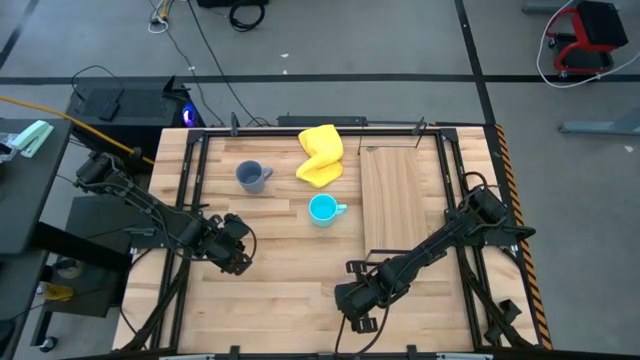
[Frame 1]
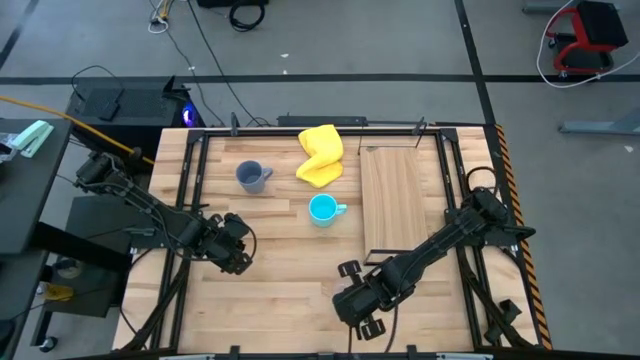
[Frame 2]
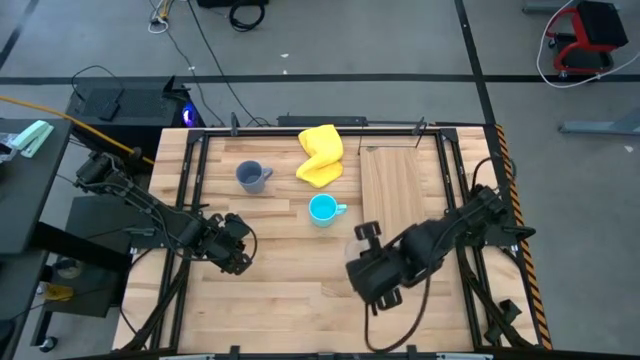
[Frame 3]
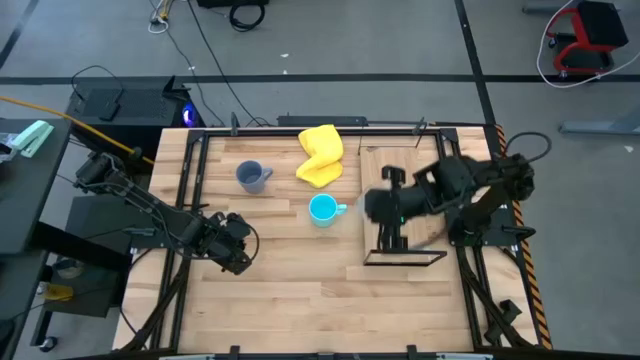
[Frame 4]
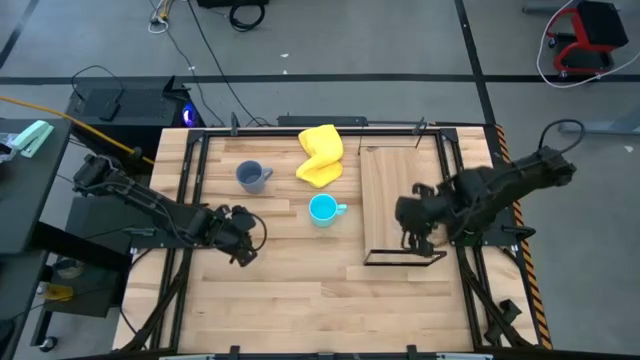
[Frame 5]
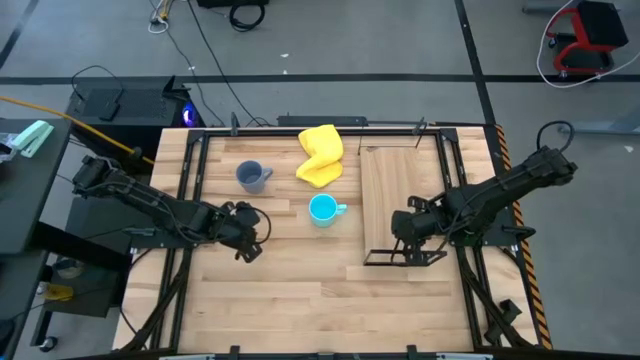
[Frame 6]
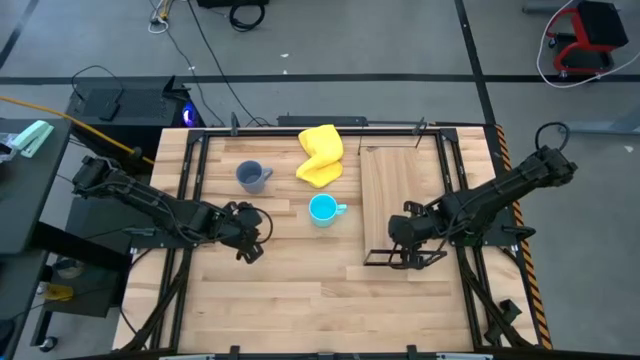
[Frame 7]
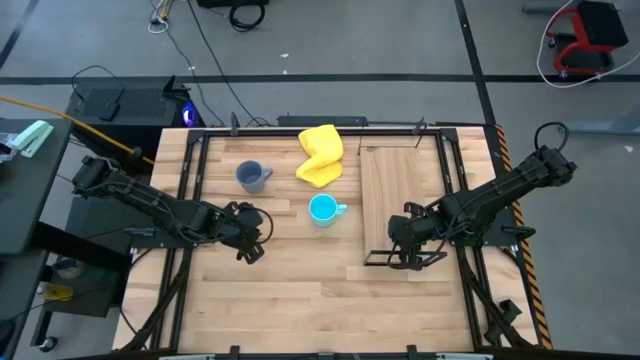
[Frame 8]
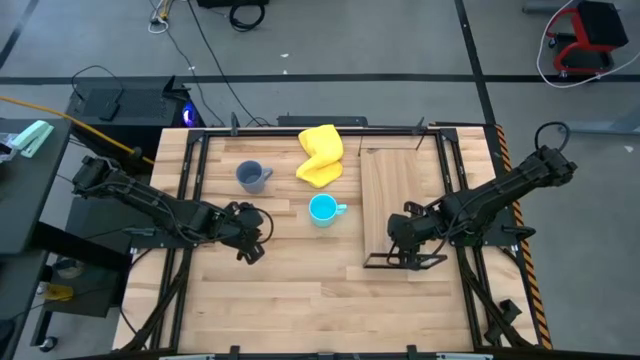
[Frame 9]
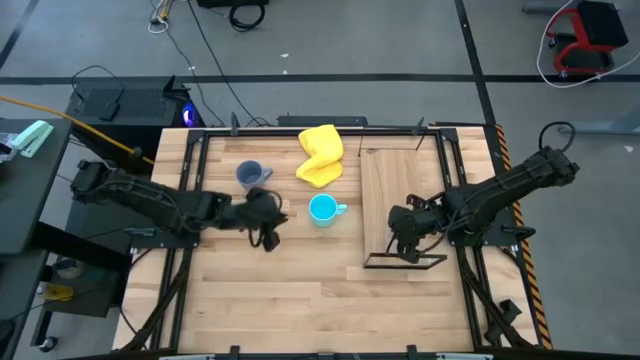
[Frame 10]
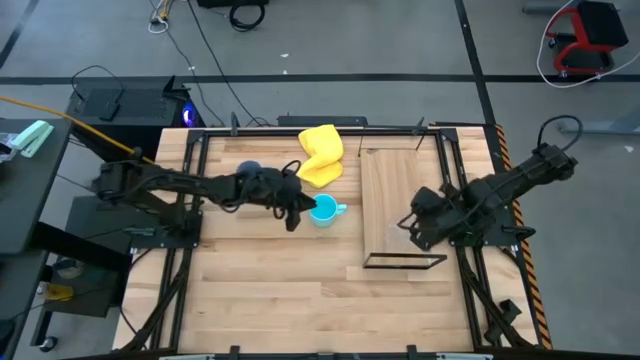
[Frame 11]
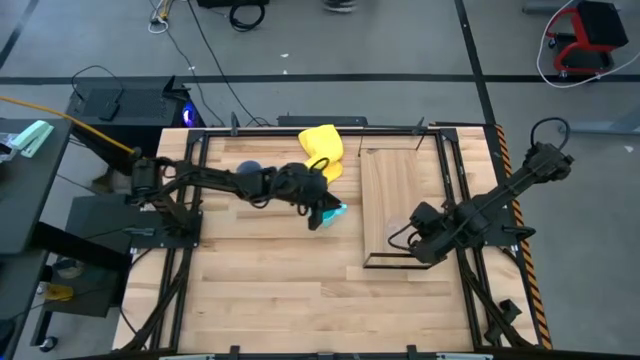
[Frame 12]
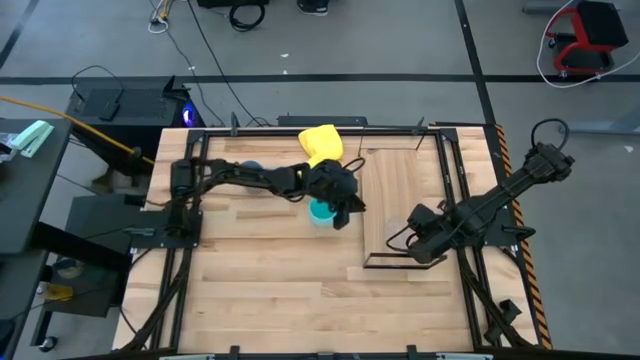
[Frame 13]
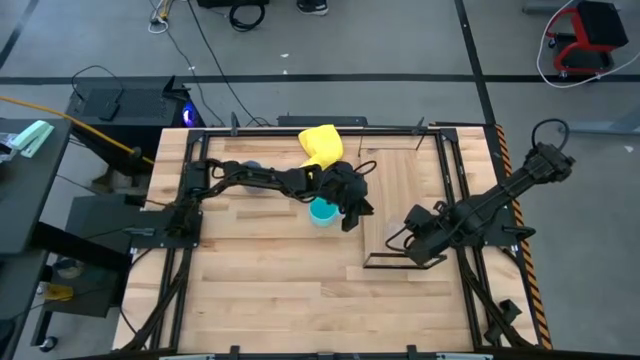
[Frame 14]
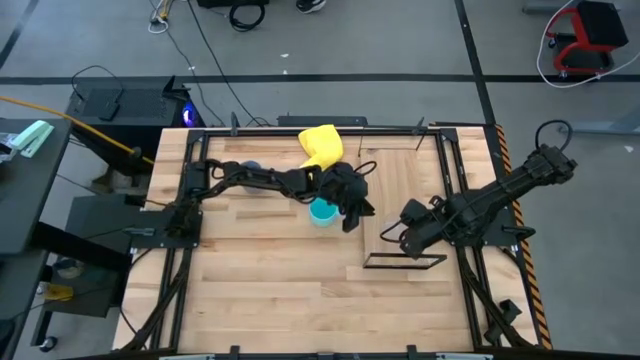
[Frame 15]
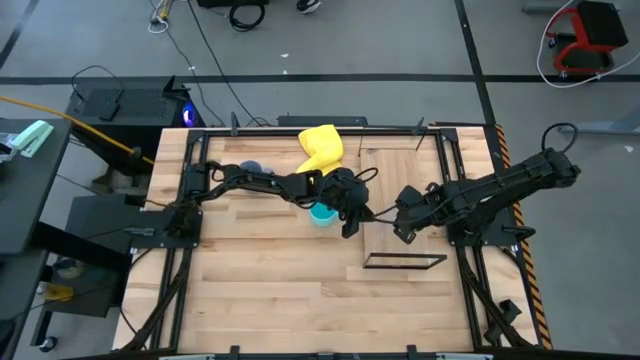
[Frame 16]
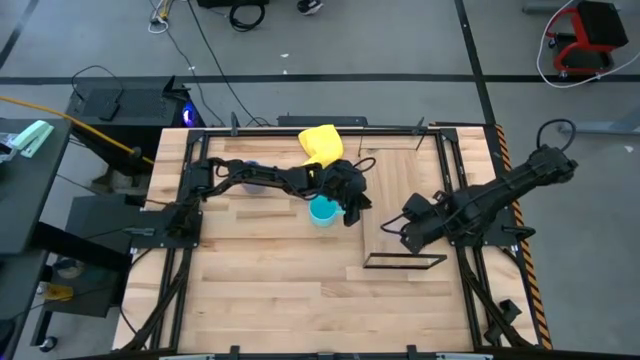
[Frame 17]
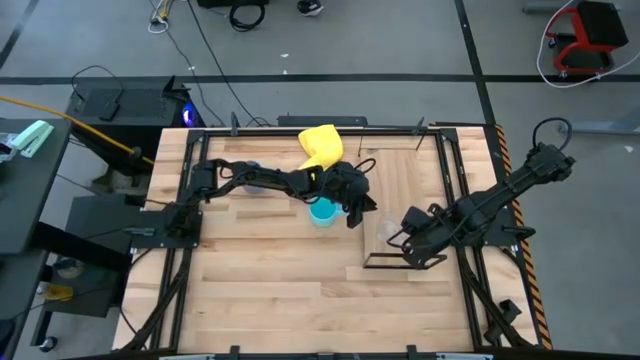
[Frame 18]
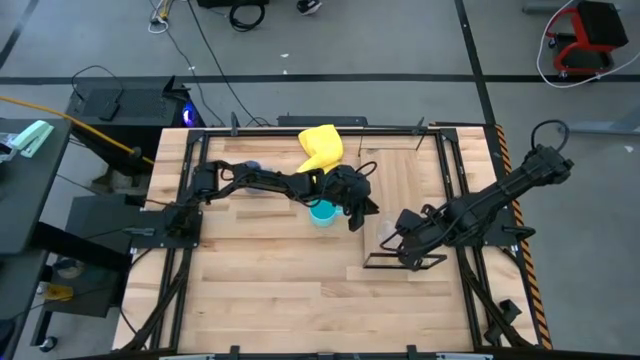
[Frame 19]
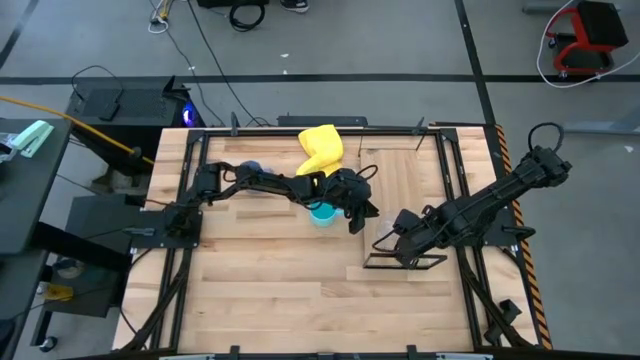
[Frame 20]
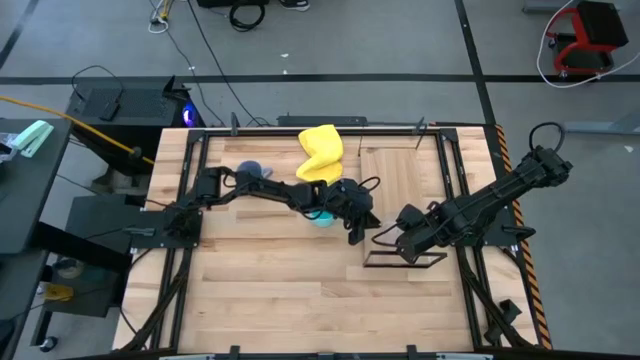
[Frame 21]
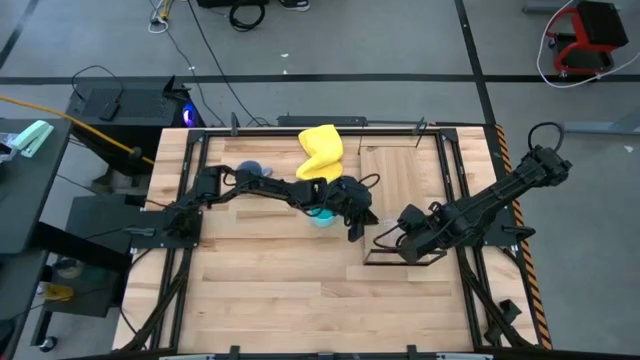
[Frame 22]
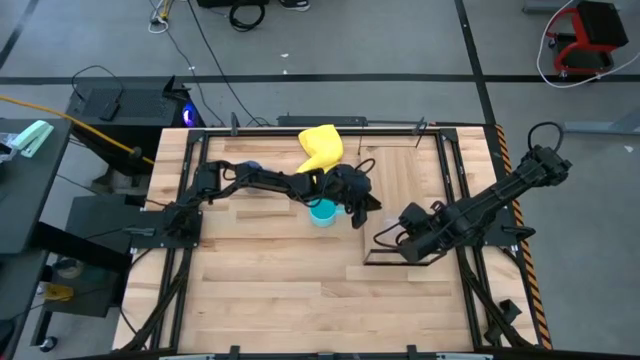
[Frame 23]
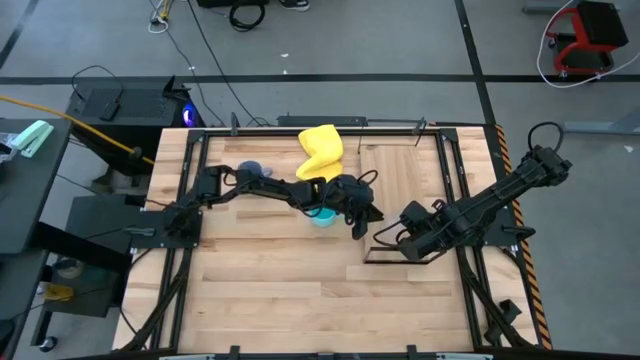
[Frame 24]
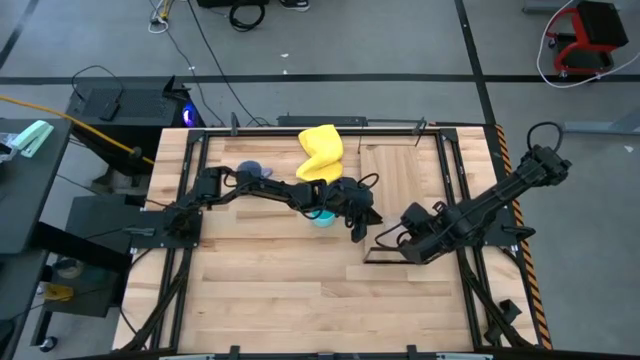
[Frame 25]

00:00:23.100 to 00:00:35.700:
Task: Stack small to large cups/mugs on shelf
Put the transparent mug on the shelf

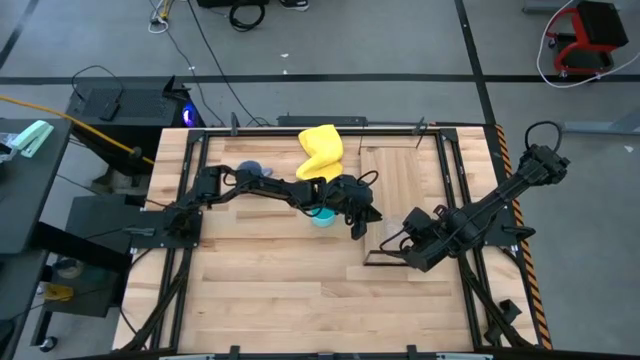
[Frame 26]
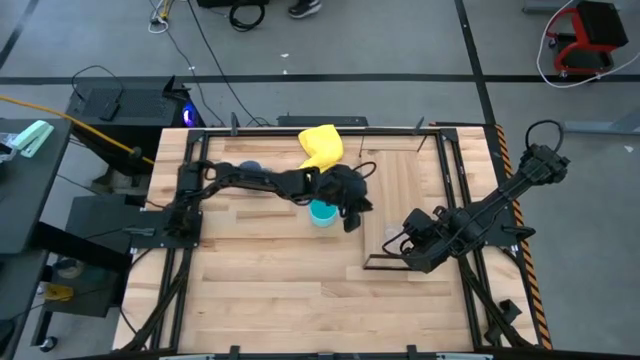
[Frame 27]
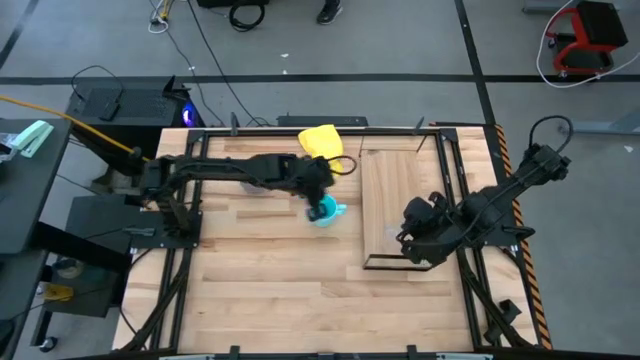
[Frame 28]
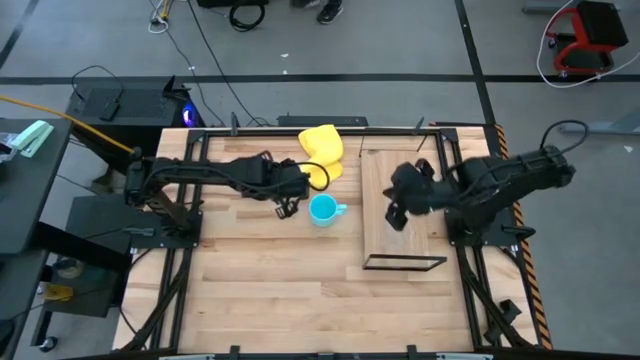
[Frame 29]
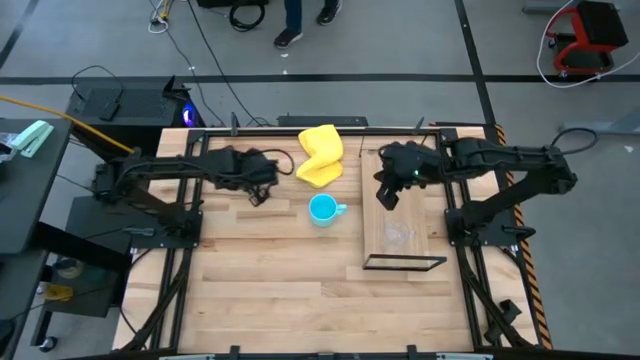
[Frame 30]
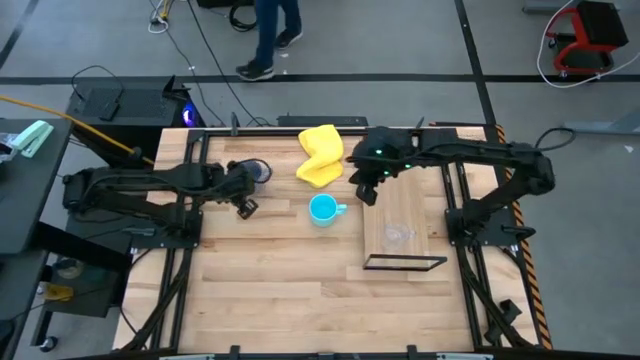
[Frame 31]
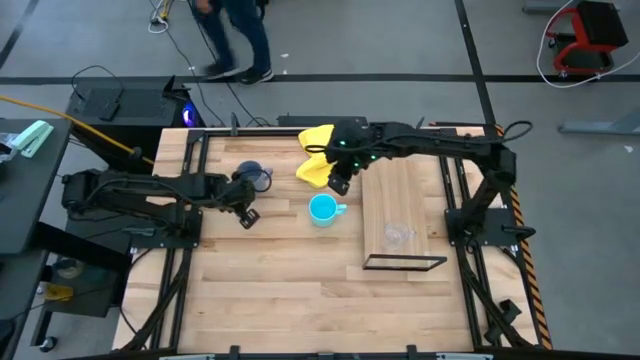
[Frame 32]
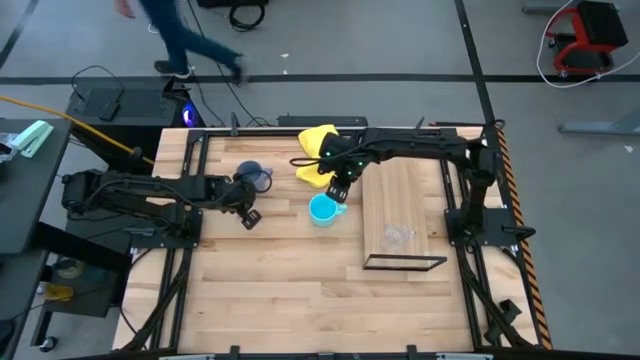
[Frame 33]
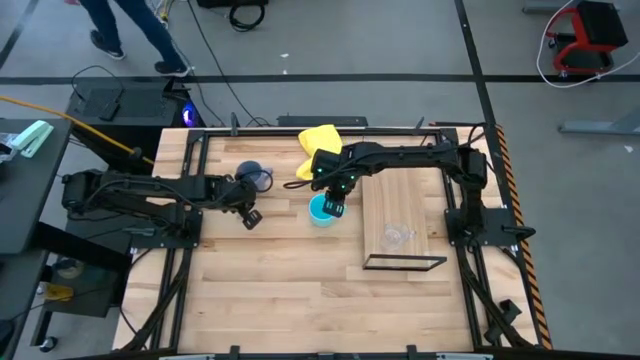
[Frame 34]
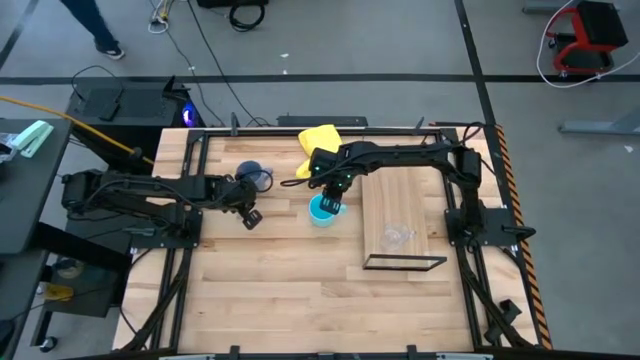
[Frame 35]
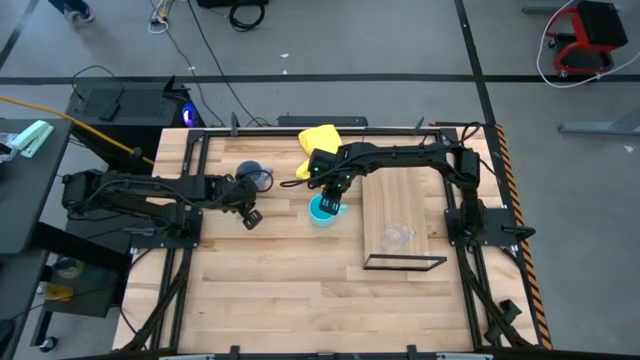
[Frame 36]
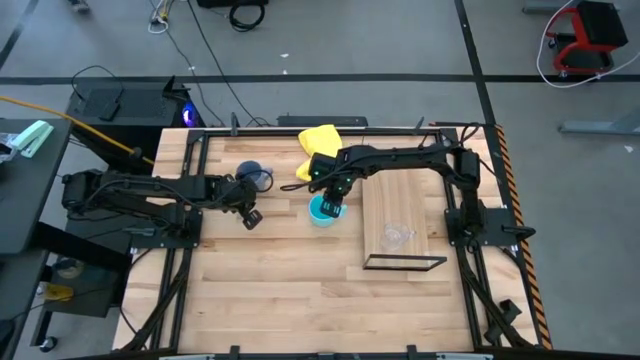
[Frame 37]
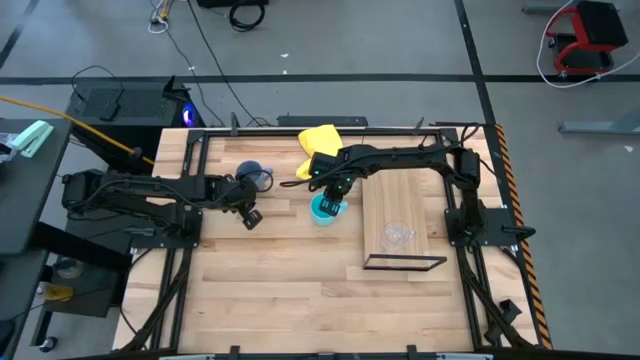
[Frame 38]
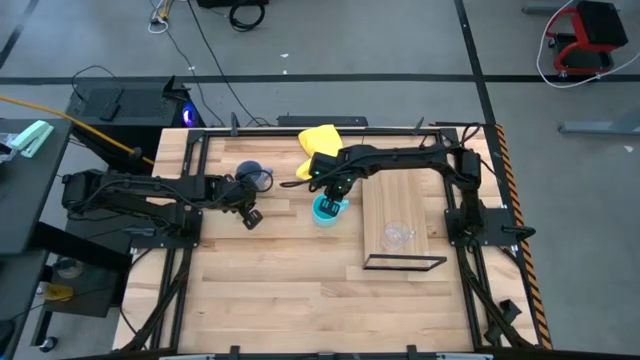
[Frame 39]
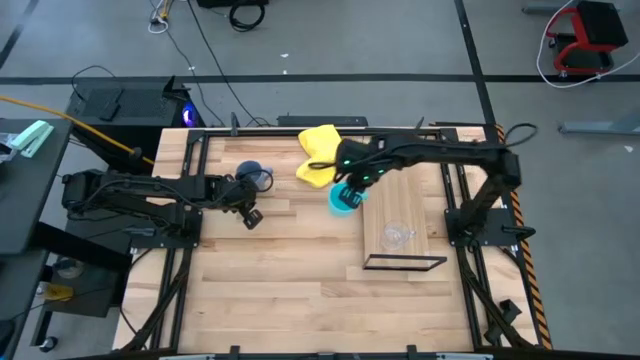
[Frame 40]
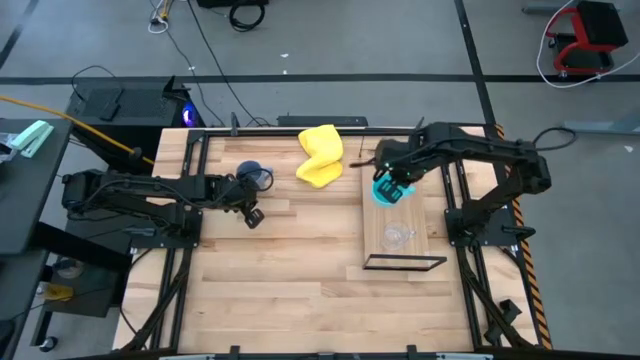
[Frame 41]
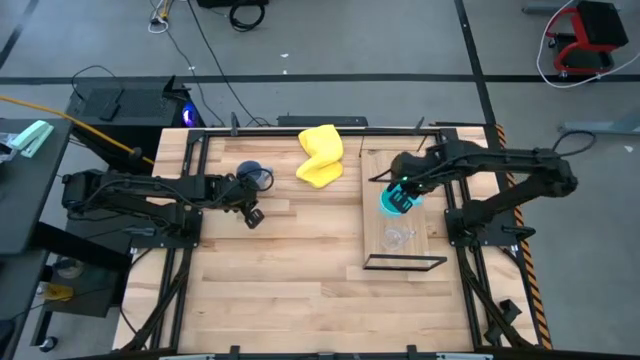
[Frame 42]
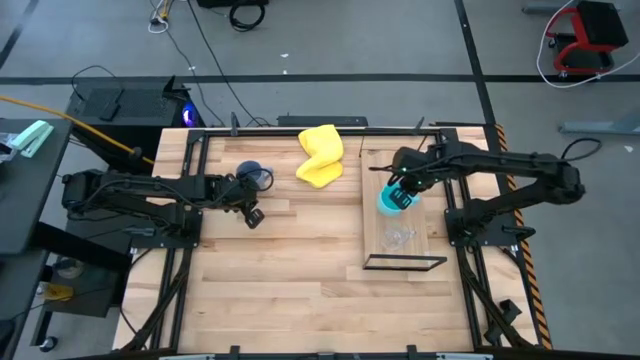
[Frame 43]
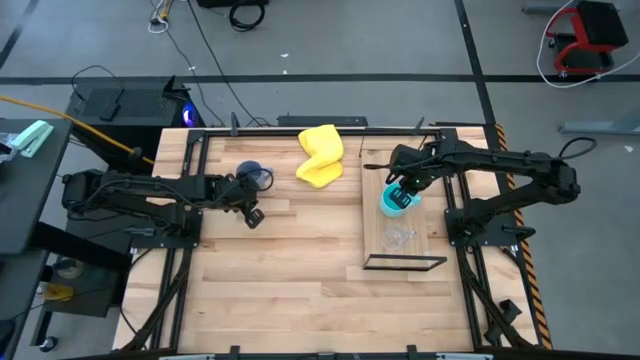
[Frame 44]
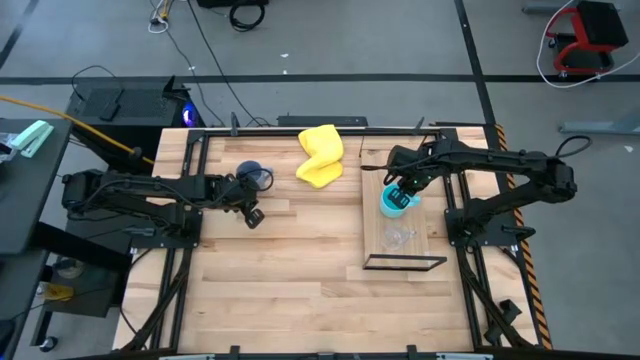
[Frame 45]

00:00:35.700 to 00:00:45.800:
Put the blue mug on the shelf
